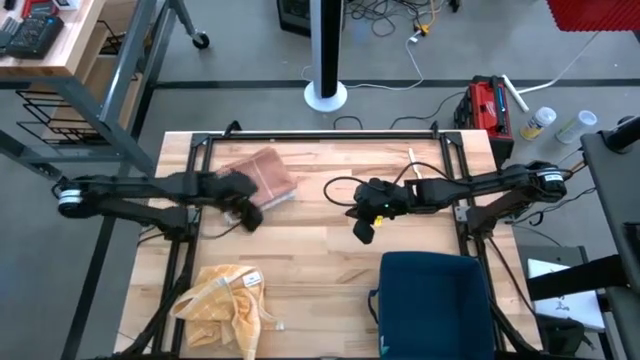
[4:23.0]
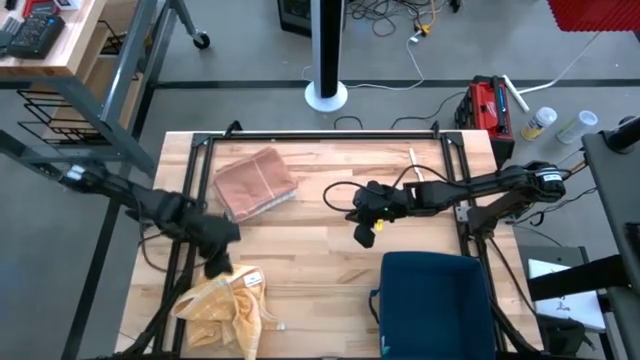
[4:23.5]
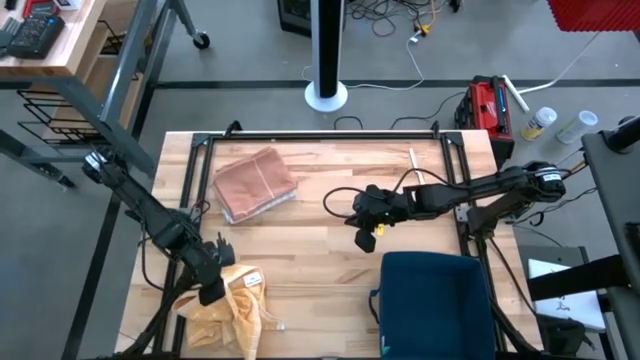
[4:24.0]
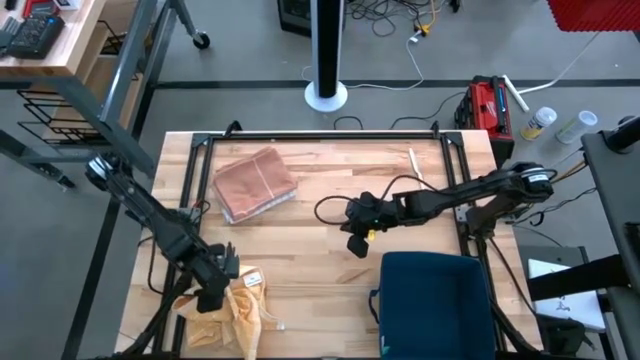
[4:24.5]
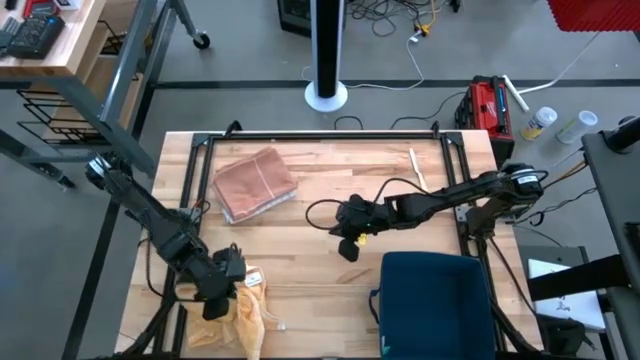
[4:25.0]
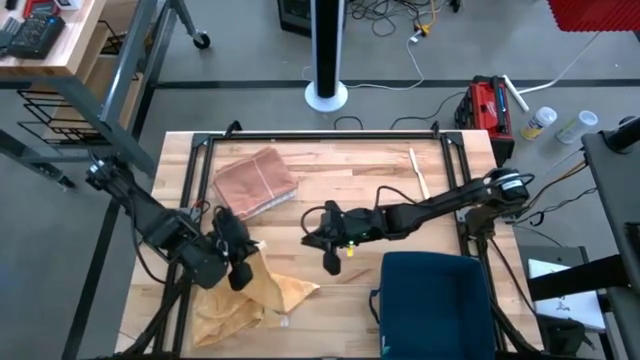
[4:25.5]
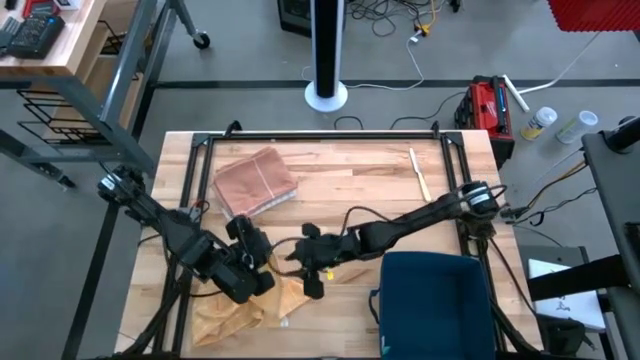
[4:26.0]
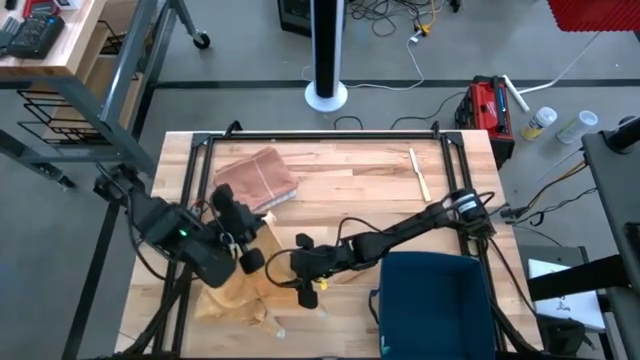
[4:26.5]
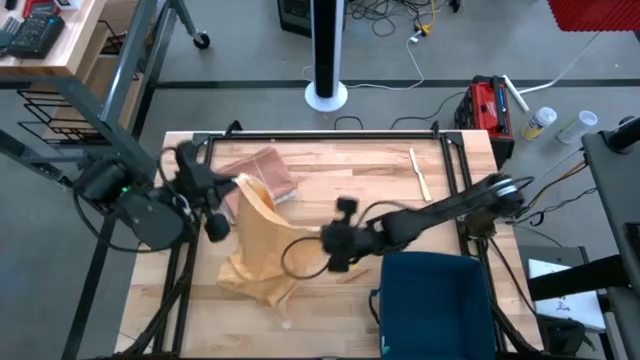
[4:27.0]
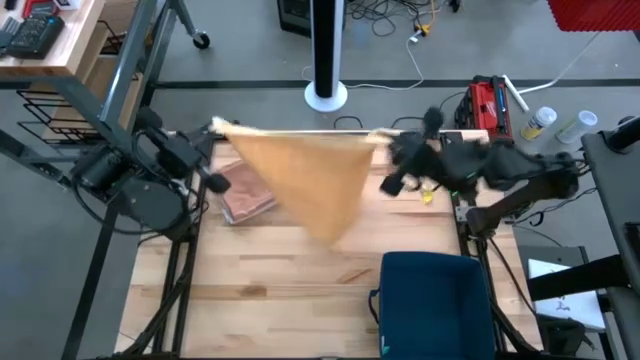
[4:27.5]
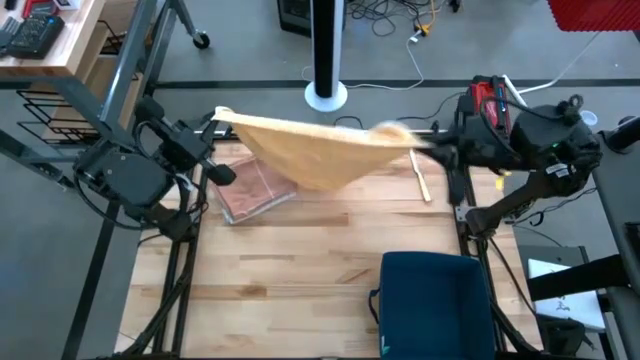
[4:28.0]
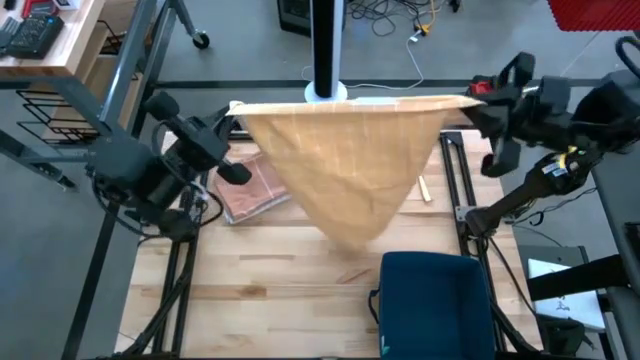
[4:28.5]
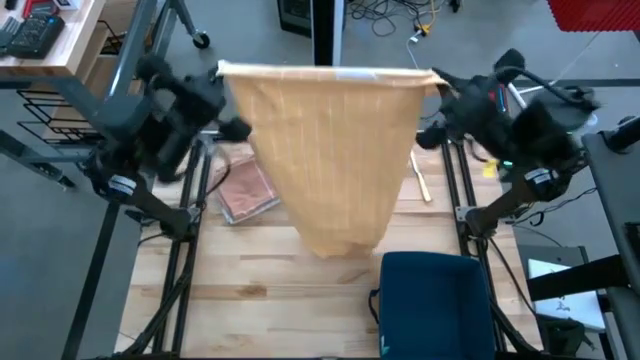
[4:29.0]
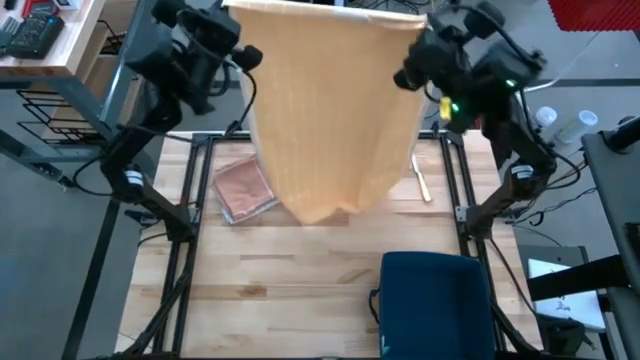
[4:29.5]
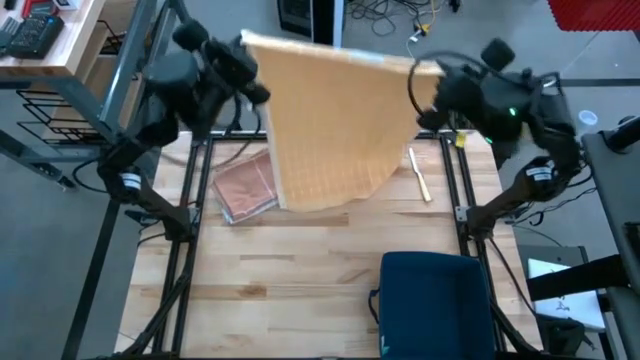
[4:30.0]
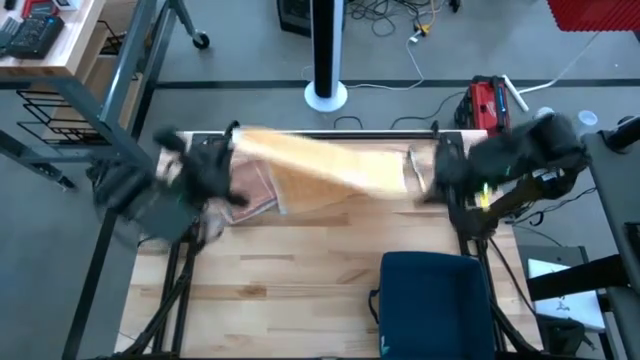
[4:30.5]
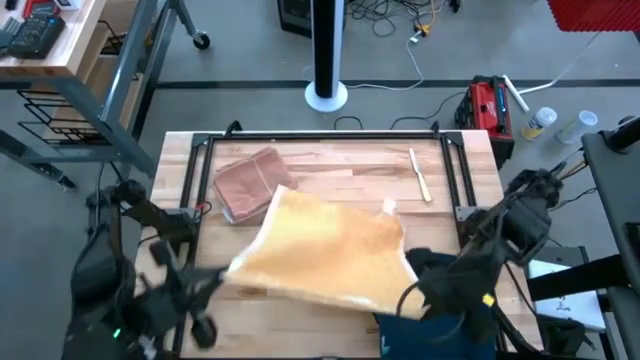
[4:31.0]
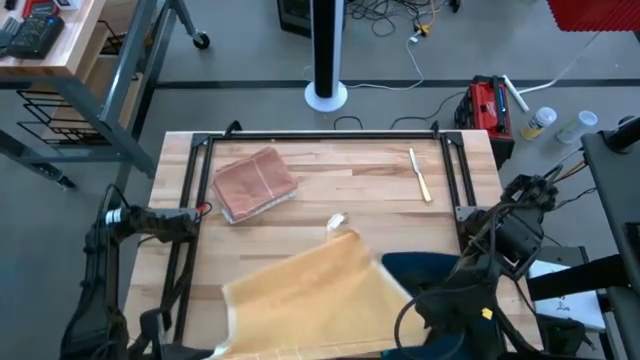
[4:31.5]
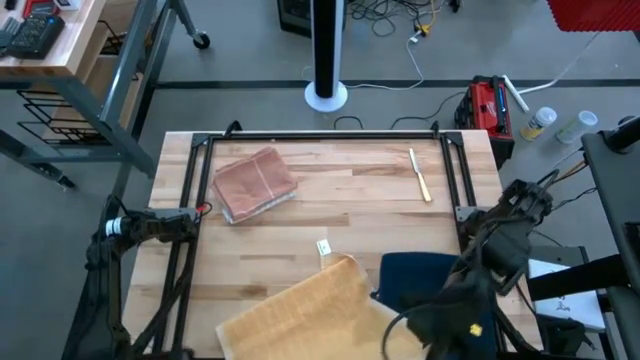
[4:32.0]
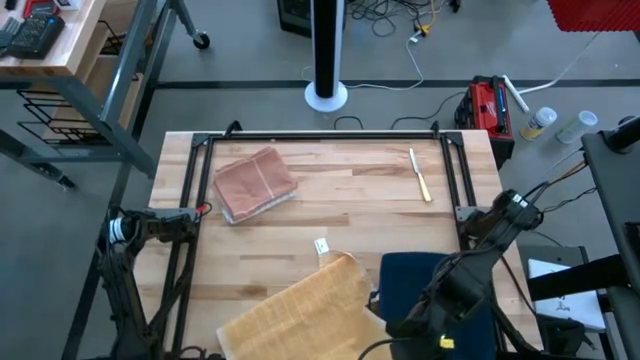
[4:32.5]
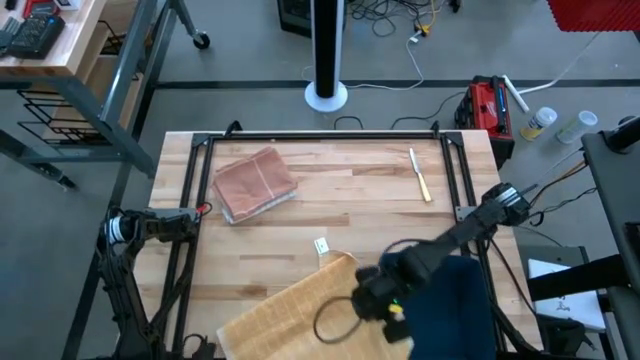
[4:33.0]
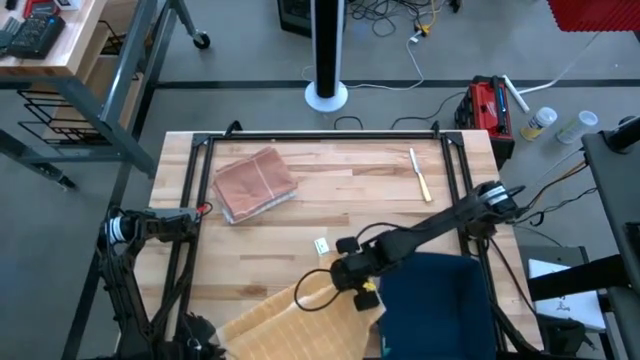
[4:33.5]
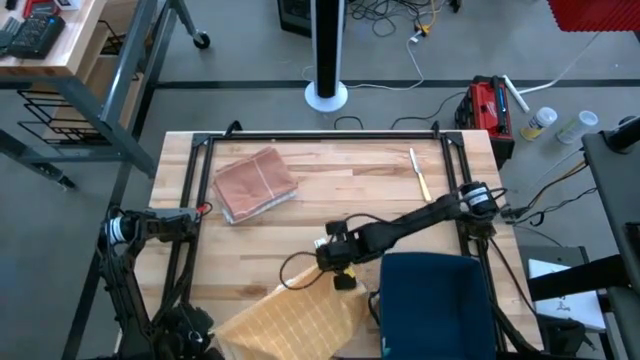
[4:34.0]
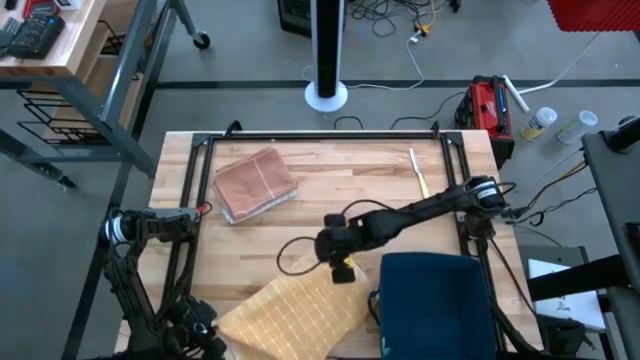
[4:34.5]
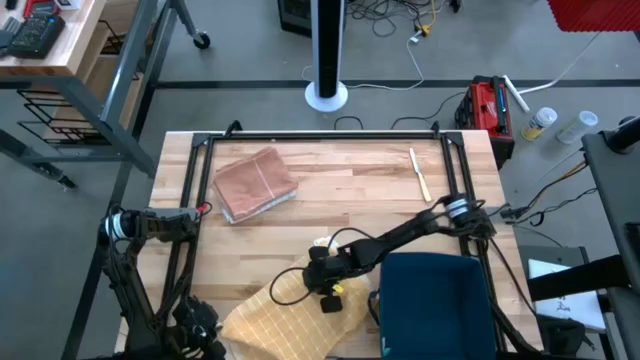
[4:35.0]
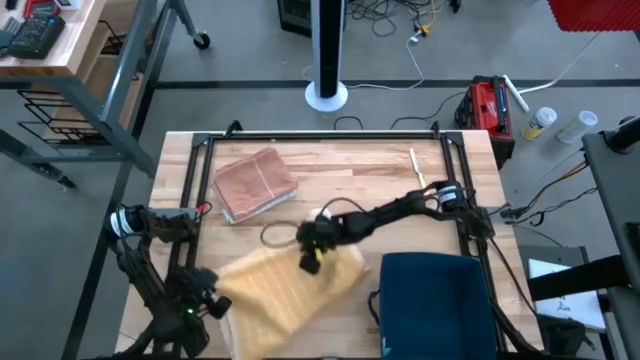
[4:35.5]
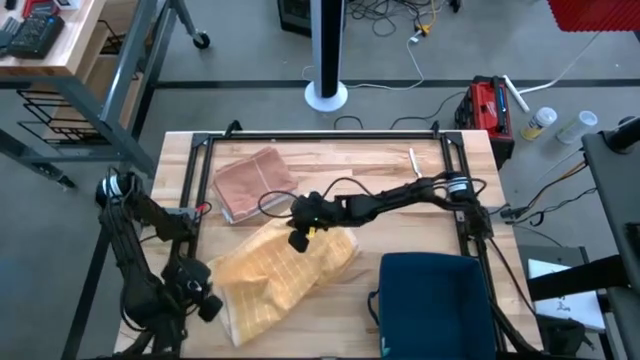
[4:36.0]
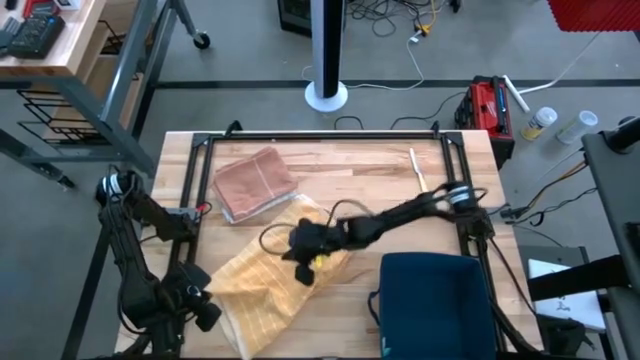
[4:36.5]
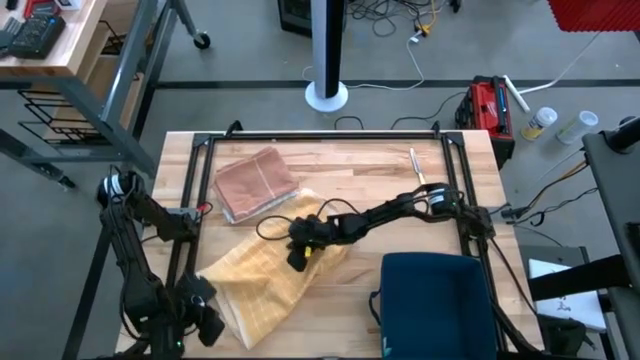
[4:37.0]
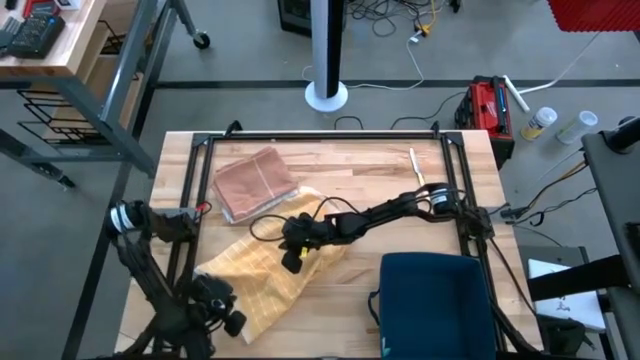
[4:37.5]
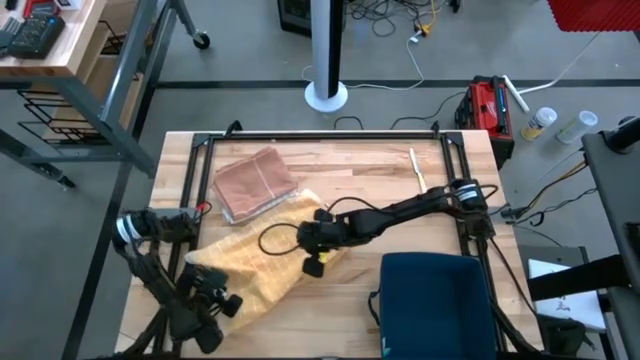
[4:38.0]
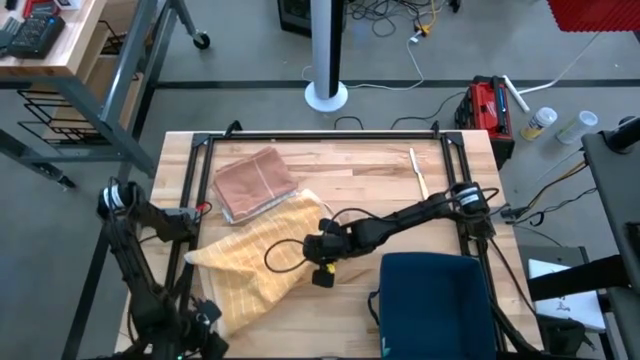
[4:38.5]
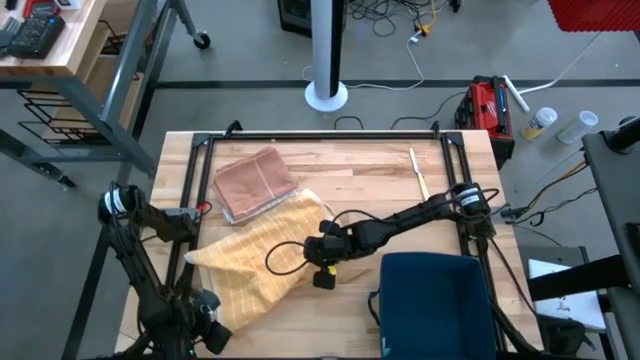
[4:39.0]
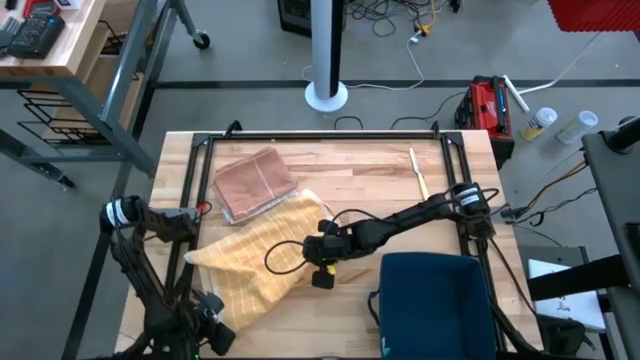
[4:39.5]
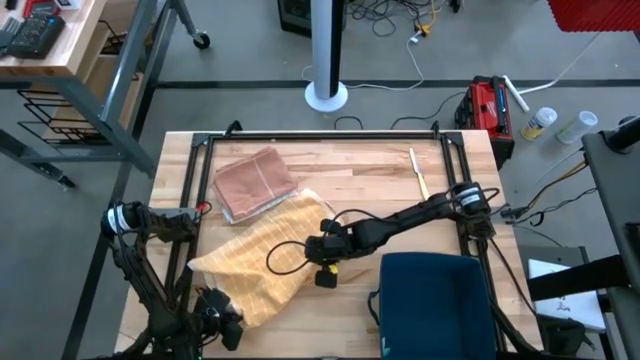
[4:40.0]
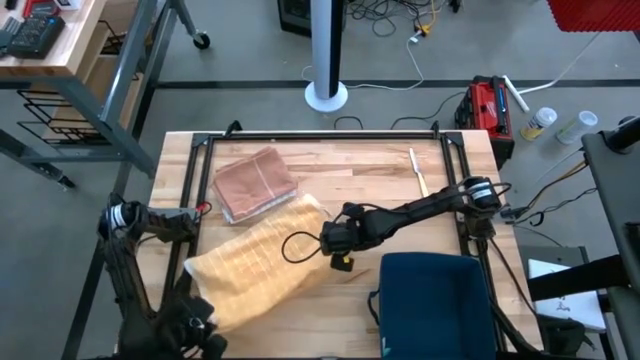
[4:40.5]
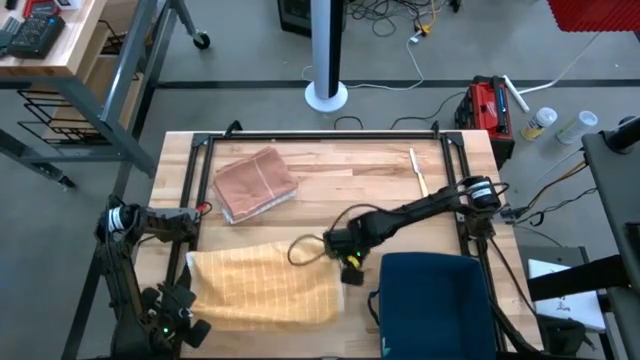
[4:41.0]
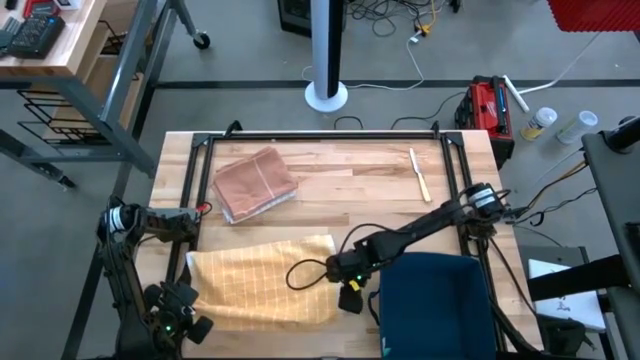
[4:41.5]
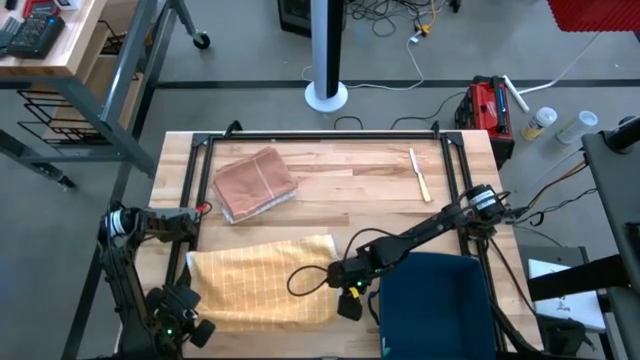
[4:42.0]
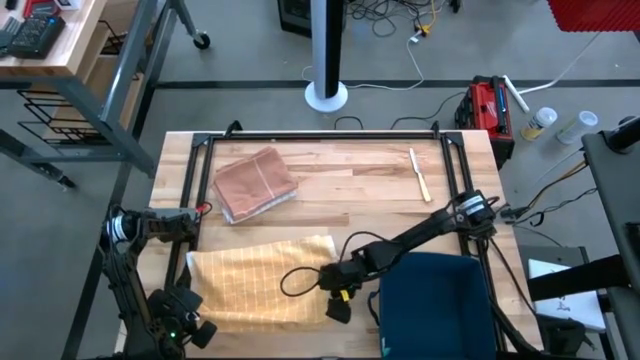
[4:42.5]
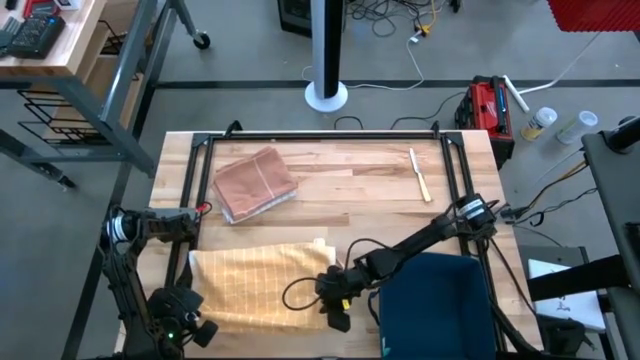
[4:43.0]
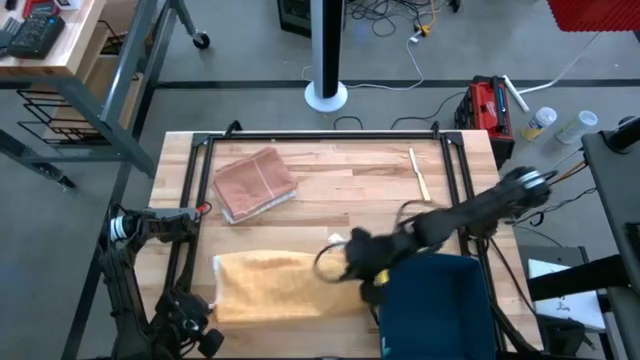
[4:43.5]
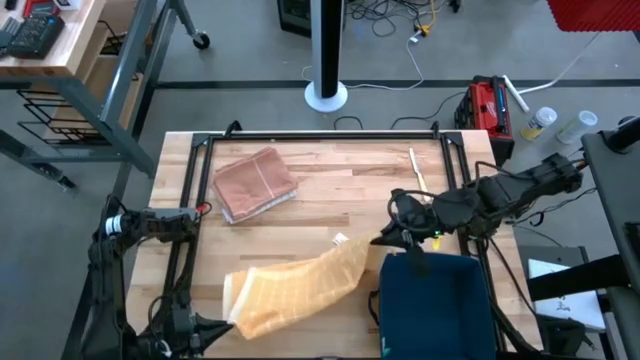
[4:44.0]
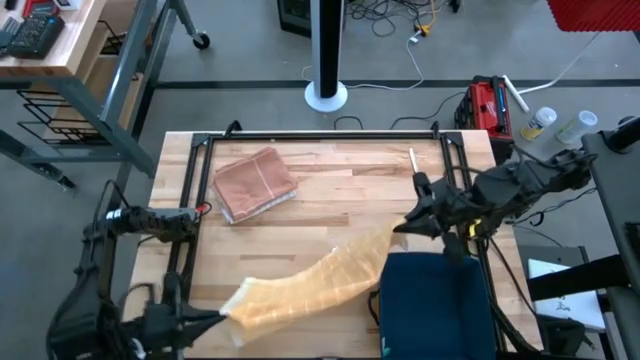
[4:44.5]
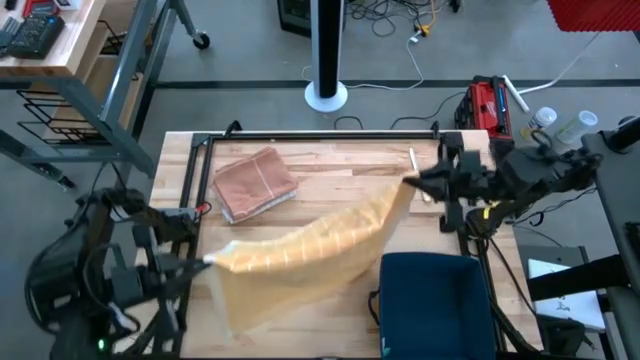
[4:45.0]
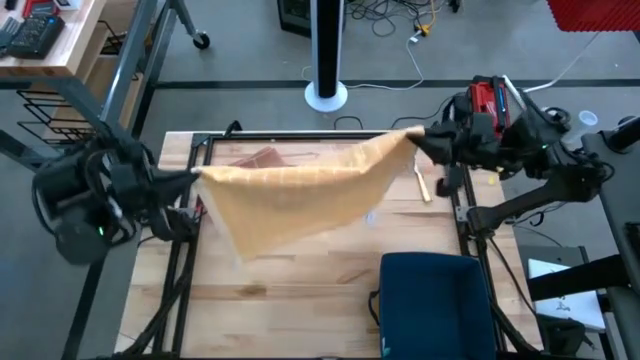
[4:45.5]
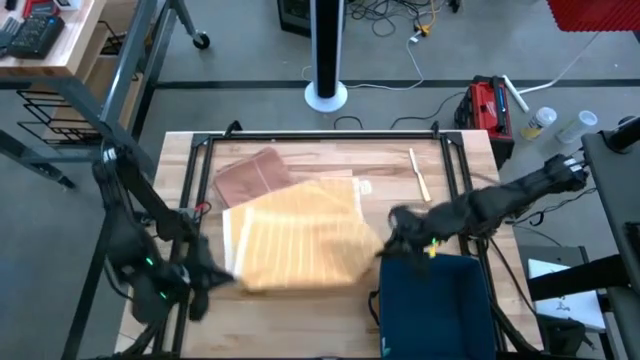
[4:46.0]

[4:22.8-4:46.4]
Task: Fold towel
Fold the yellow towel
